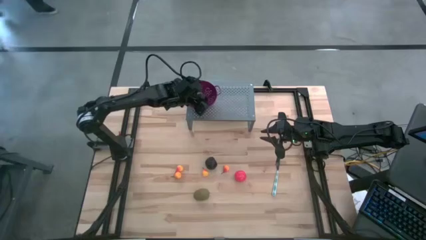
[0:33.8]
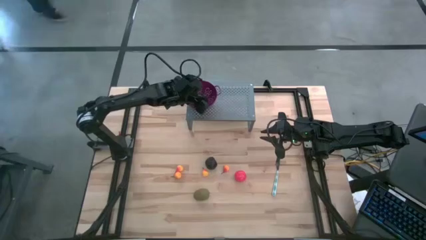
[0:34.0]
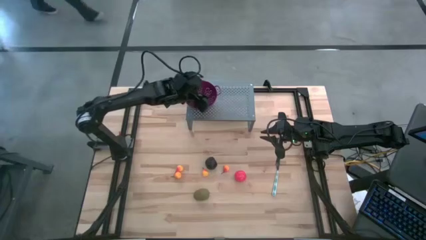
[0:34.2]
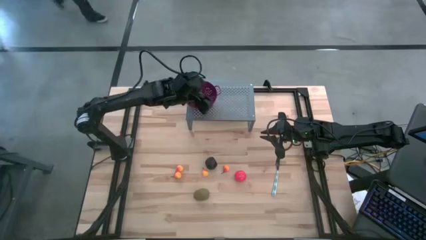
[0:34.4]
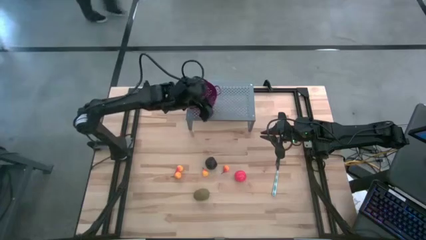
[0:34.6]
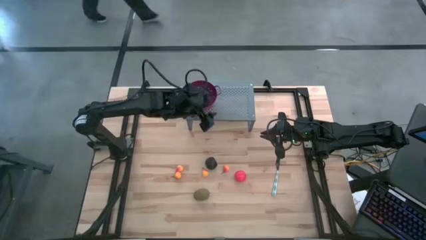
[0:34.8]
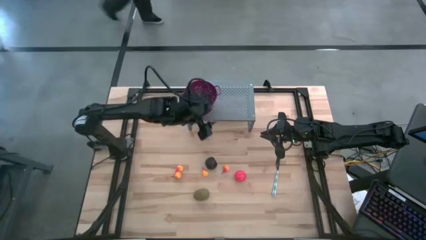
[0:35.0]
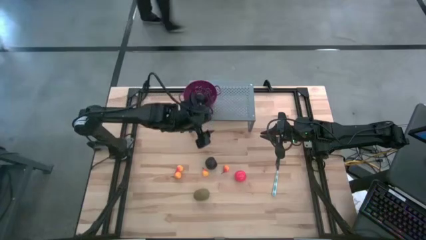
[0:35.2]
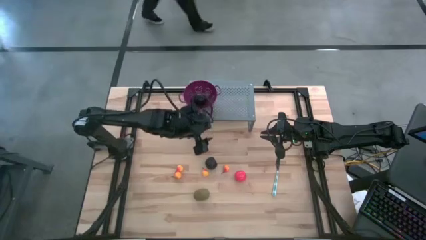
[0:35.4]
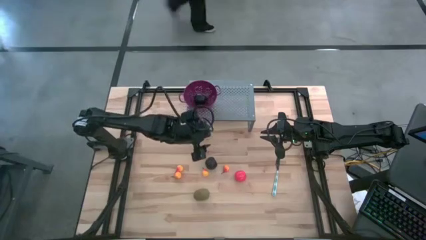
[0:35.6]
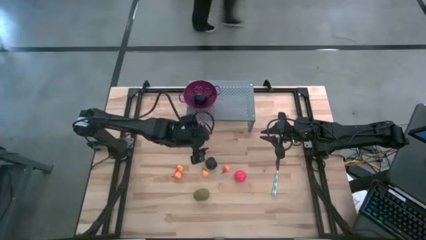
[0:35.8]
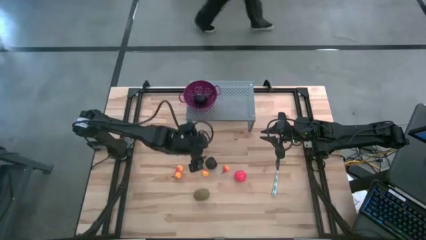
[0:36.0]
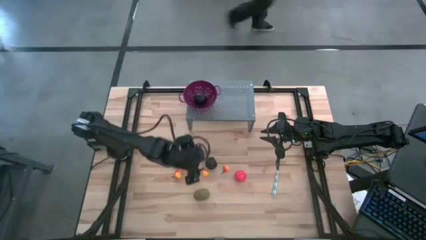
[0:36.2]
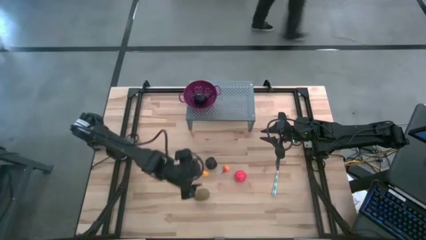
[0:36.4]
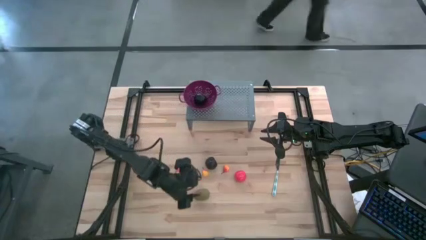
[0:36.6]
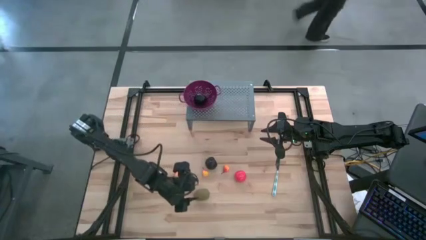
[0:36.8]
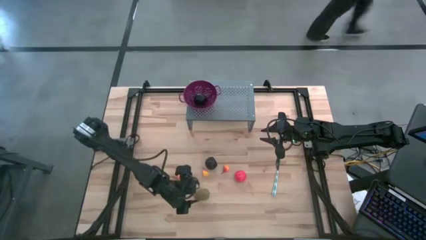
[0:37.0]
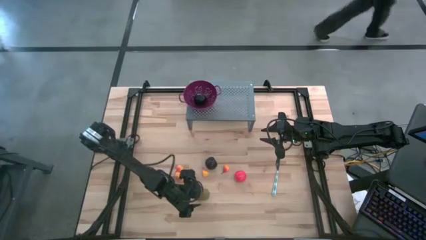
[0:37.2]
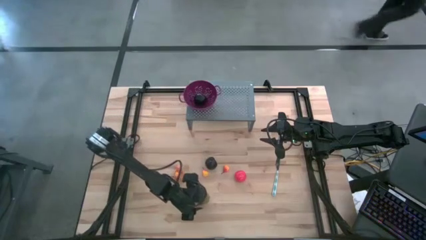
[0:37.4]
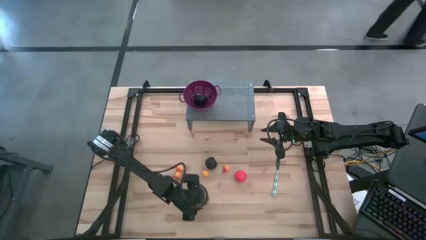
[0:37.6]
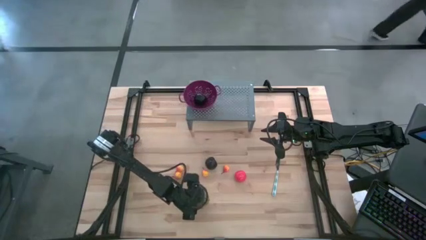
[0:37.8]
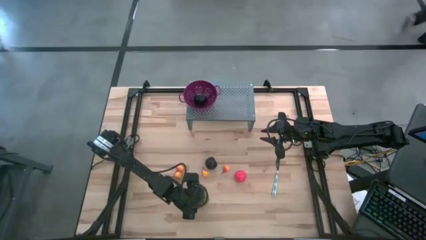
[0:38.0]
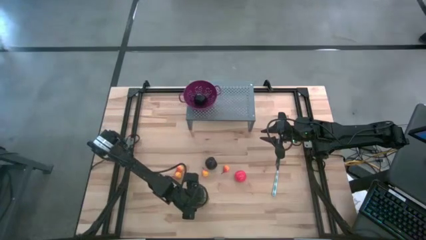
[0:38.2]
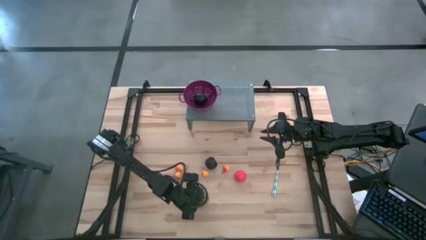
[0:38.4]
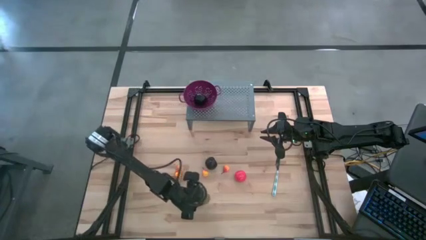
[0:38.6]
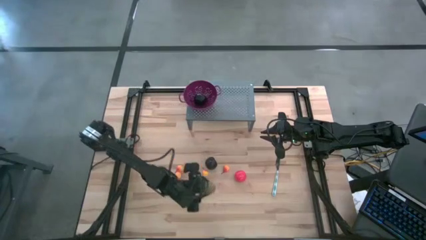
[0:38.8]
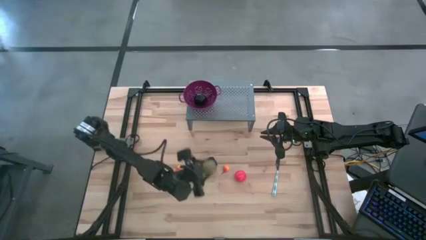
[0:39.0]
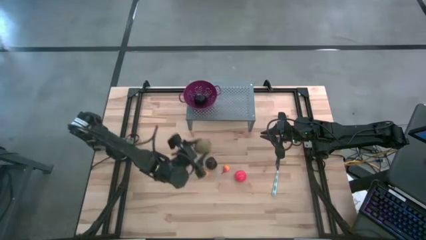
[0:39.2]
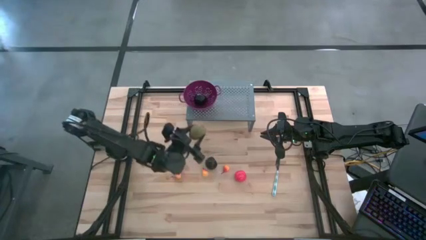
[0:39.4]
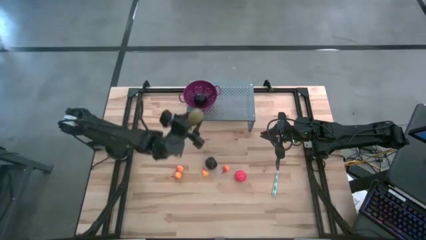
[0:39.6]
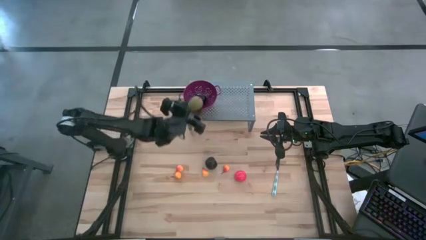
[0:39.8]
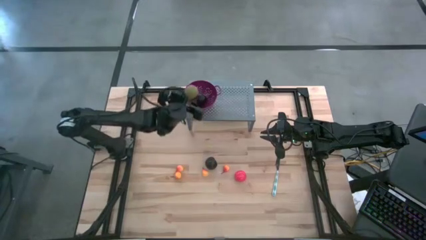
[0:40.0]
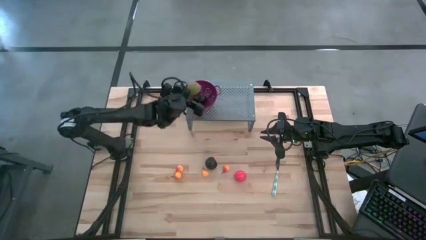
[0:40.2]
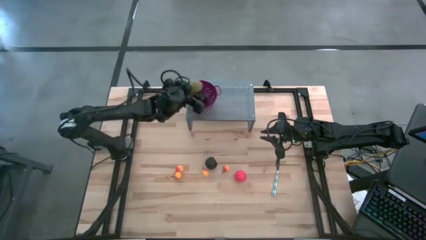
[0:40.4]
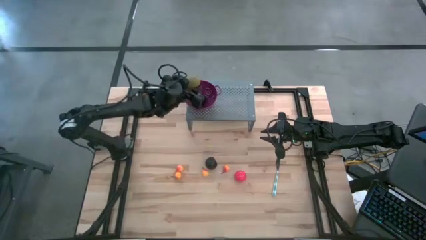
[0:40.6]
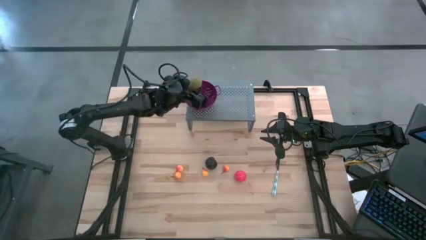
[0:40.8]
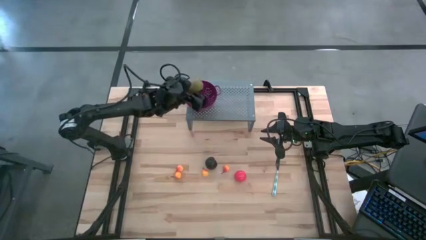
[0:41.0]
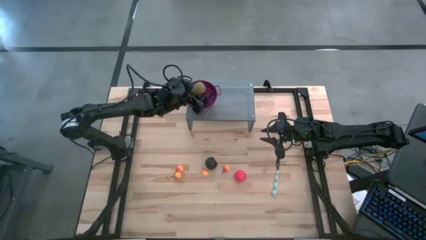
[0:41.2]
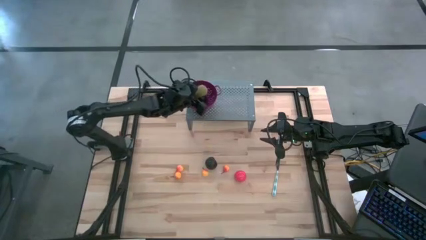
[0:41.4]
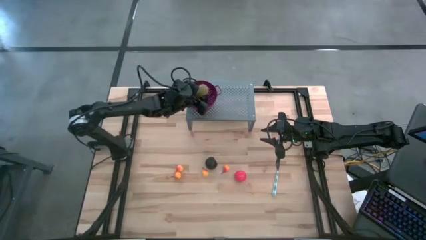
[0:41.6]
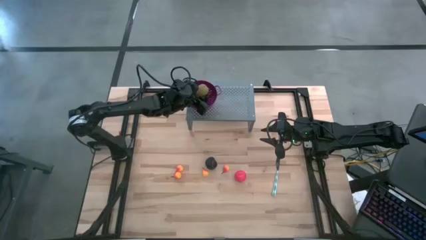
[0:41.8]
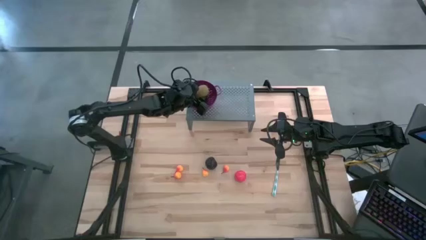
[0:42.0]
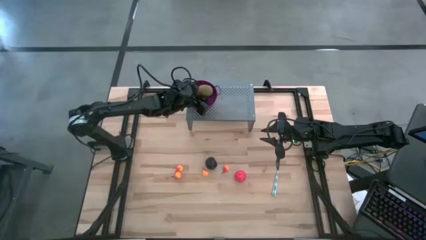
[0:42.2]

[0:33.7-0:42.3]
Task: Pick & Place Fruit
Put the brown kiwi into the purple strainer bowl on the shelf

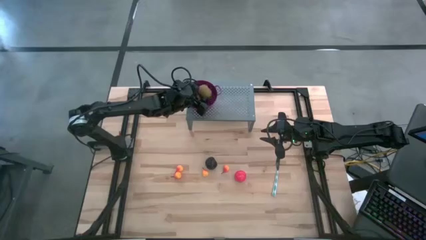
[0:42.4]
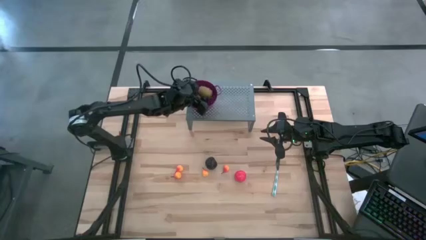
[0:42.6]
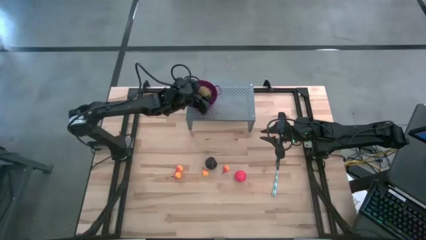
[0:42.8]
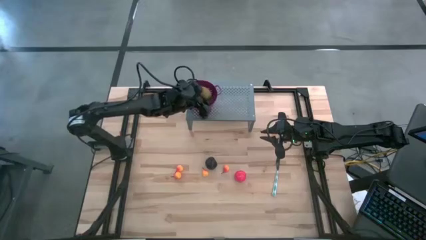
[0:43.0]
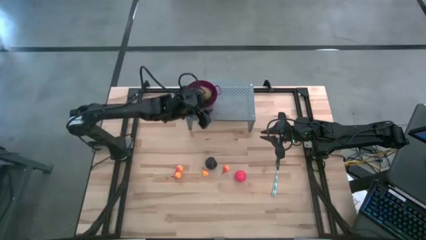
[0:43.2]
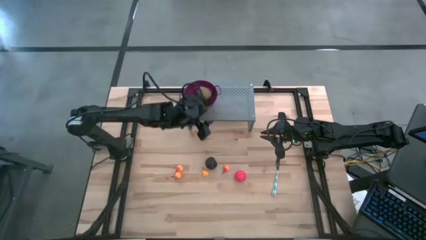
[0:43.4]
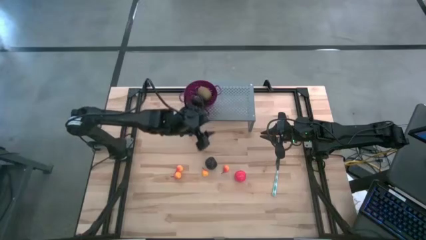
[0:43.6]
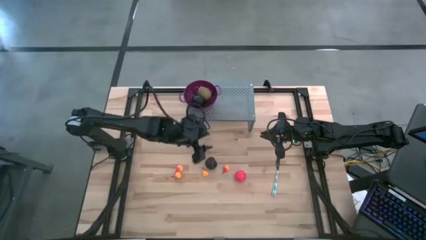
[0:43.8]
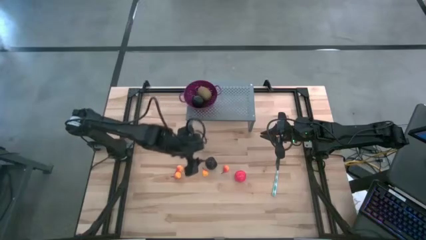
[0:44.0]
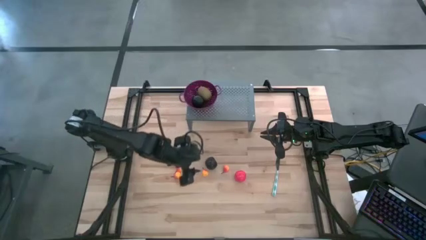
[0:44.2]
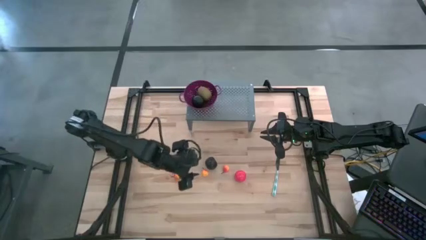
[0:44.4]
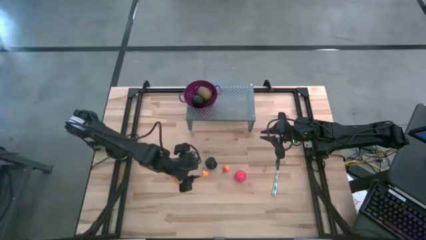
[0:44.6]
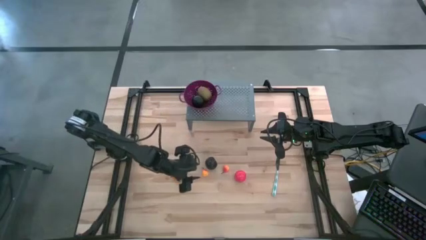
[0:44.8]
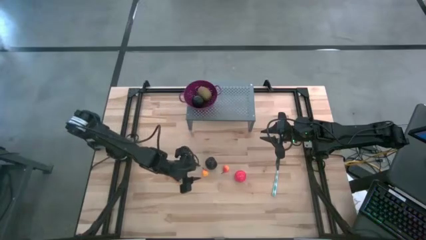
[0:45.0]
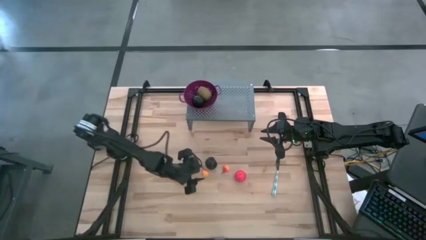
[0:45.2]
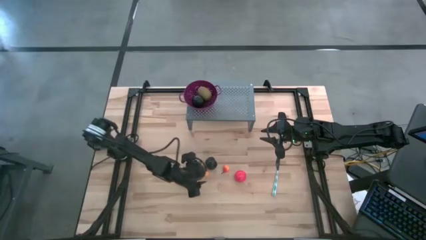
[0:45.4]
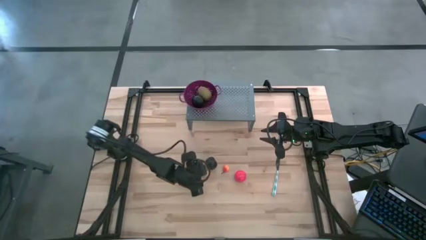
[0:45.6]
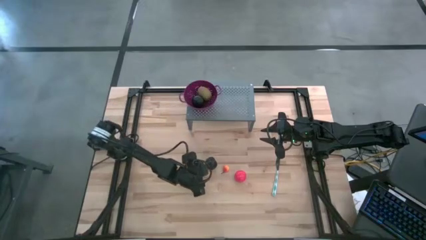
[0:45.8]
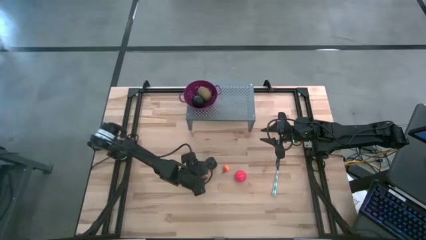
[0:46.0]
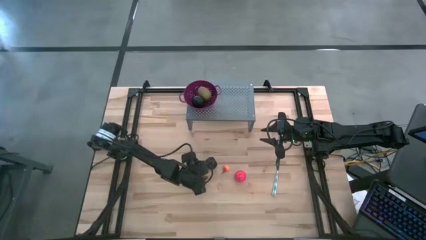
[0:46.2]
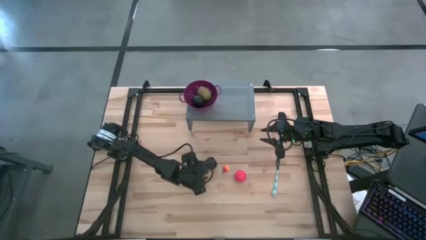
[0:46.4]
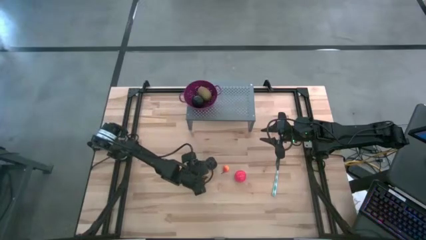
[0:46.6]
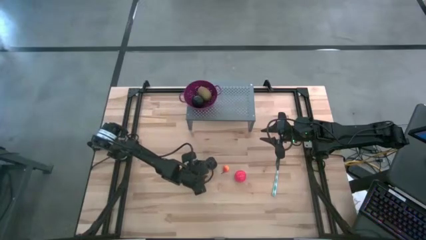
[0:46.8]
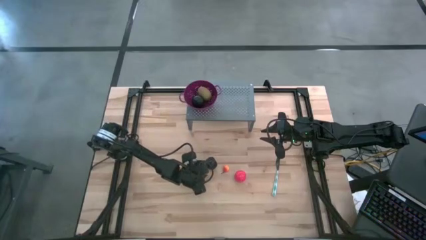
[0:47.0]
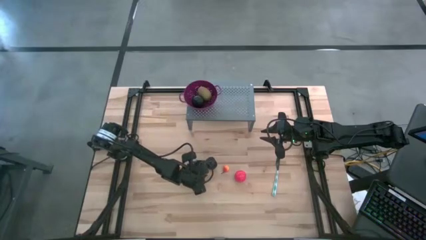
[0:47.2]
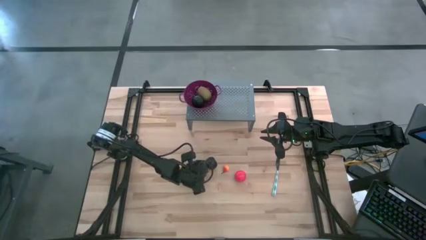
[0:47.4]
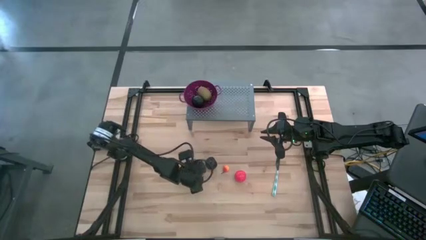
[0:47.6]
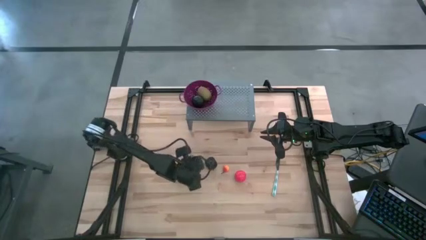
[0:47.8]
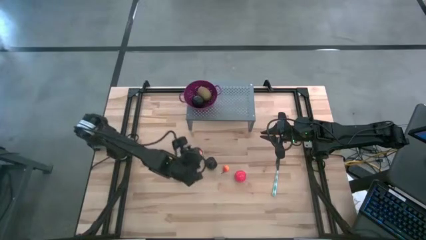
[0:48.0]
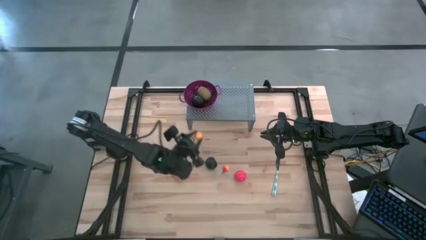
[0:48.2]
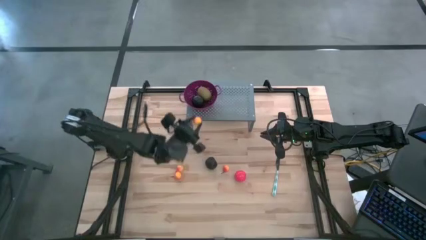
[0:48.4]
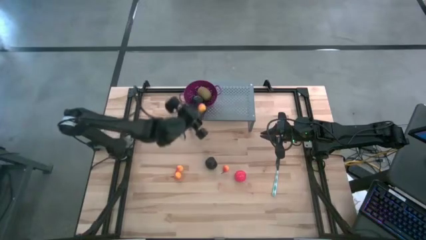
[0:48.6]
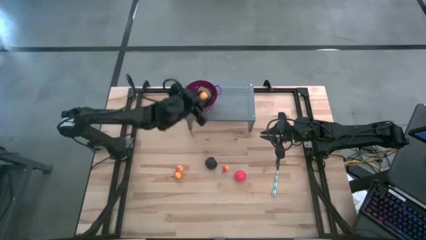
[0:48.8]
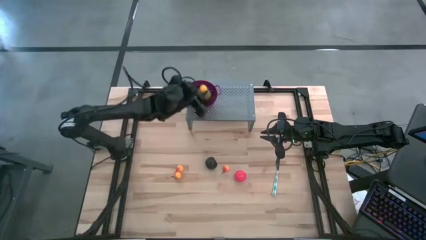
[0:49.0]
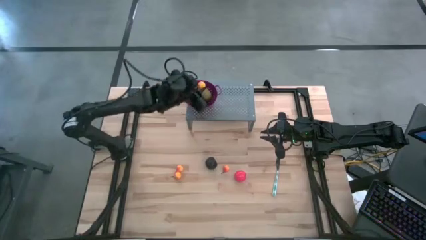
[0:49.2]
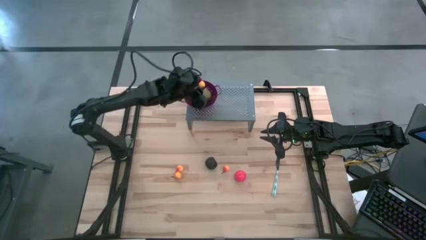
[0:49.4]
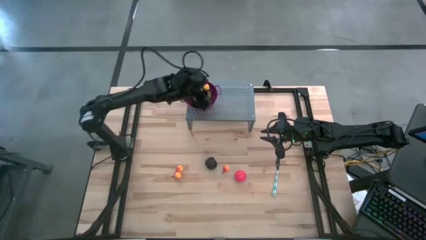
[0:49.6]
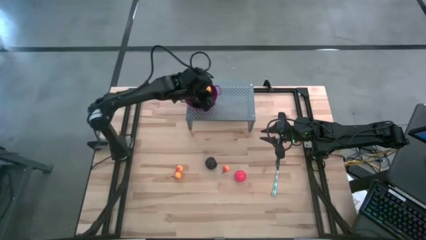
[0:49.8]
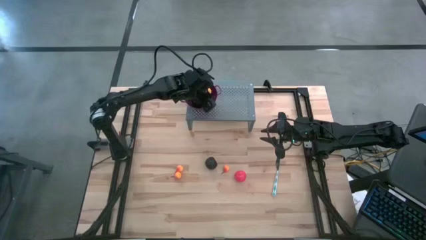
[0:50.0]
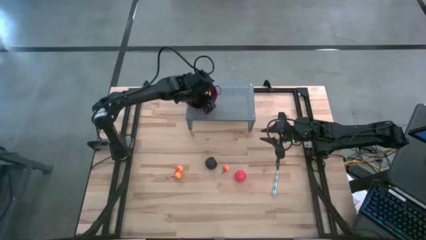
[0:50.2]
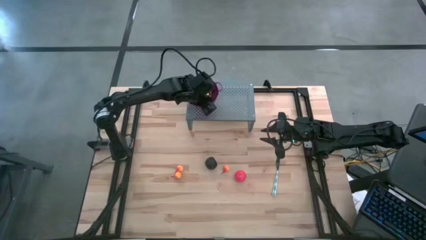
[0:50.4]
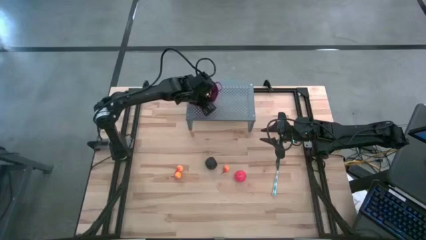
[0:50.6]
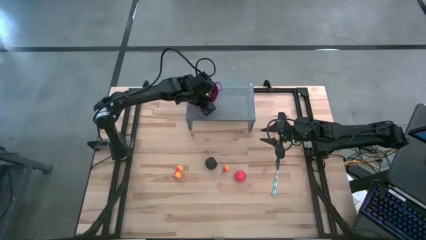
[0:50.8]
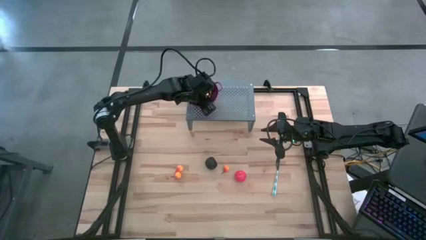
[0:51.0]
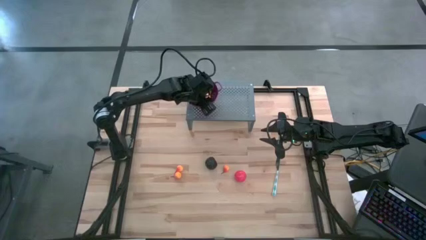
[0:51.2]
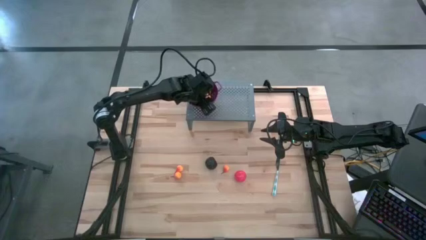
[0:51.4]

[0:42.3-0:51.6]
Put the yellow pear into the purple strainer bowl on the shelf

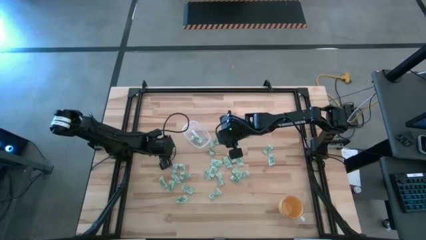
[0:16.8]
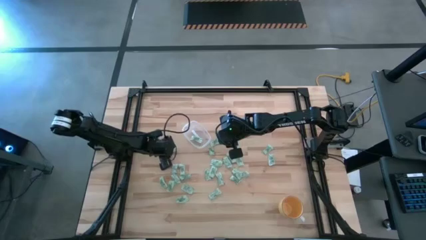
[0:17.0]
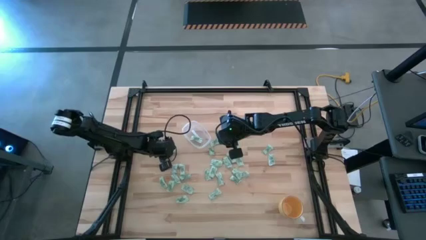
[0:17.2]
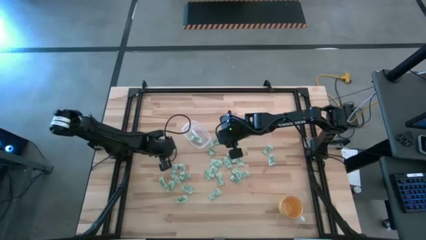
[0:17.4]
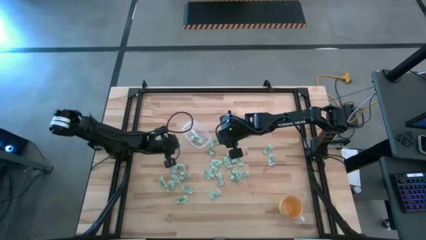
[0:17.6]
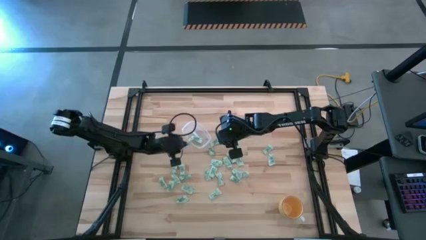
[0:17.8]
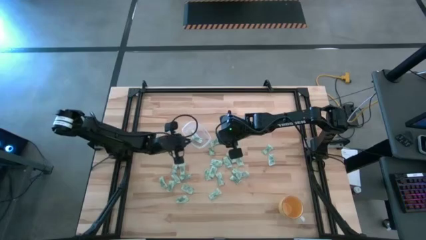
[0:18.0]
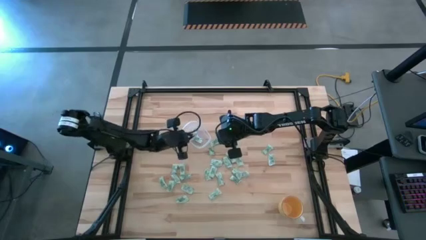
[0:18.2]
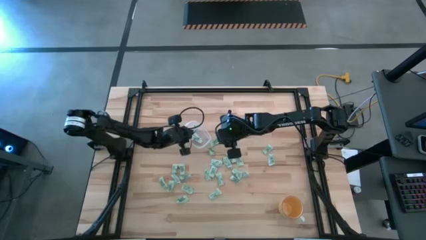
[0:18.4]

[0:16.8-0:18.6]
Task: Pick and place Stevia / Truvia into bins
Put the stevia packet into the transparent bin
